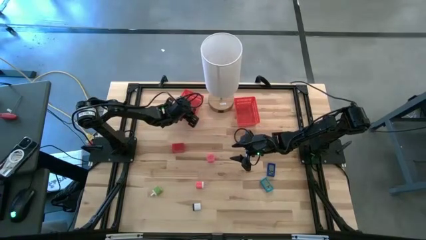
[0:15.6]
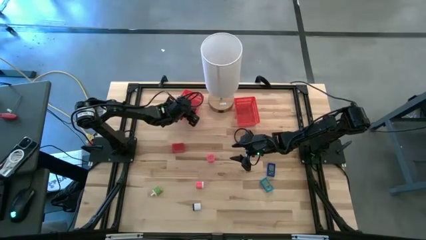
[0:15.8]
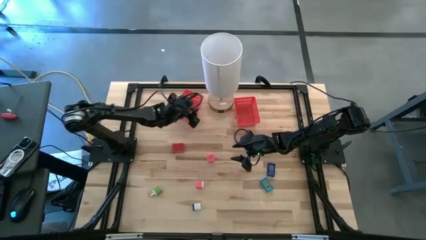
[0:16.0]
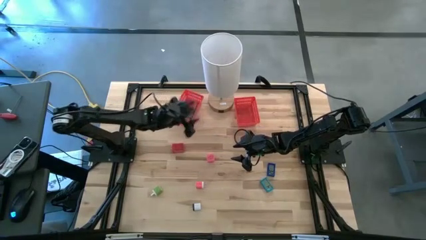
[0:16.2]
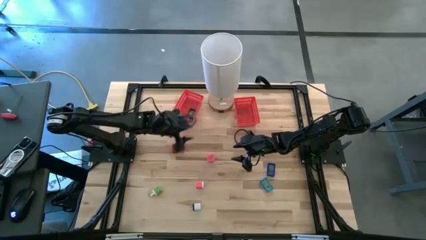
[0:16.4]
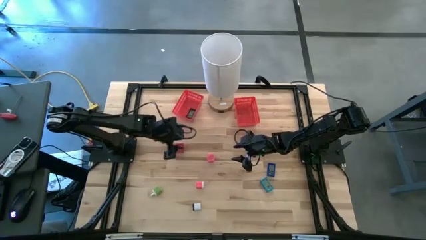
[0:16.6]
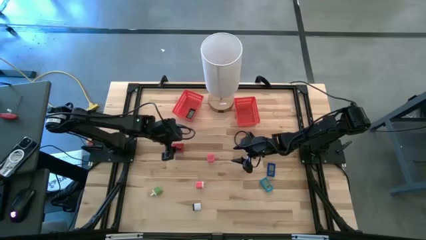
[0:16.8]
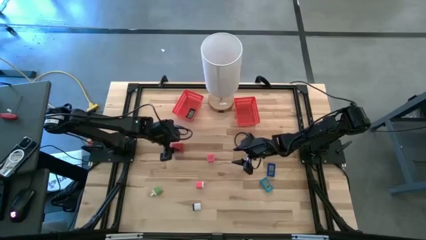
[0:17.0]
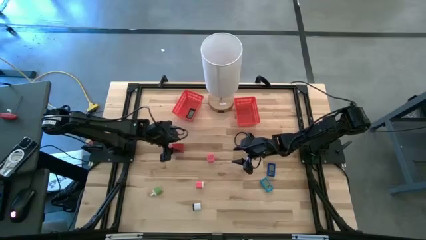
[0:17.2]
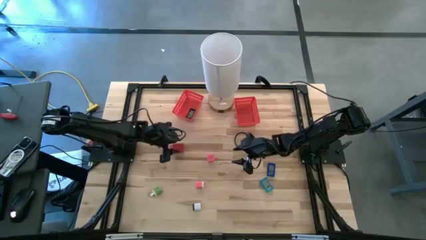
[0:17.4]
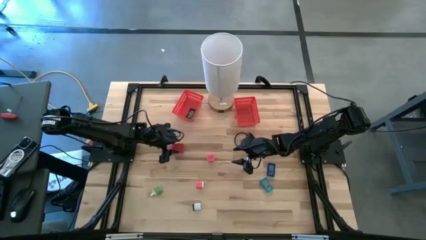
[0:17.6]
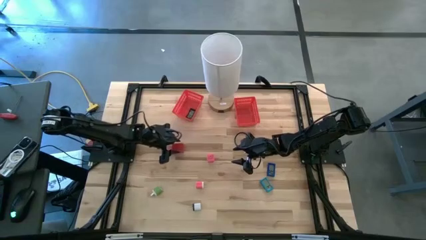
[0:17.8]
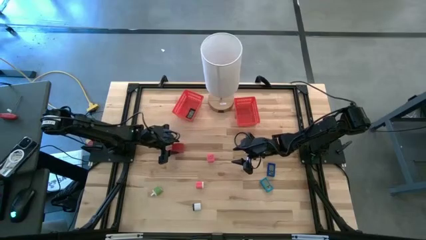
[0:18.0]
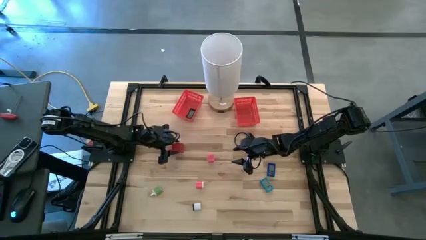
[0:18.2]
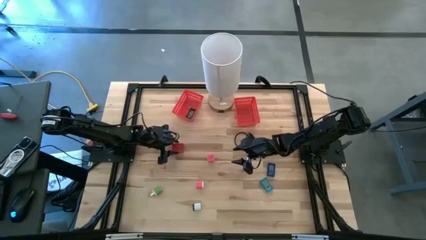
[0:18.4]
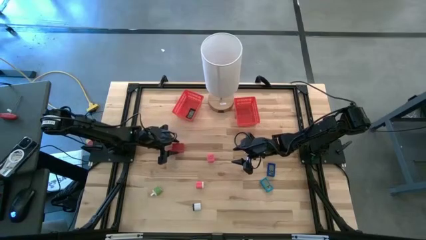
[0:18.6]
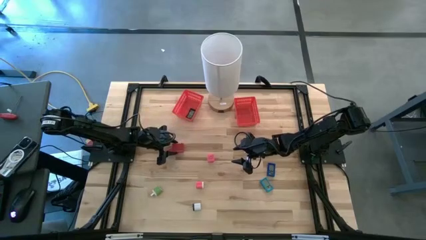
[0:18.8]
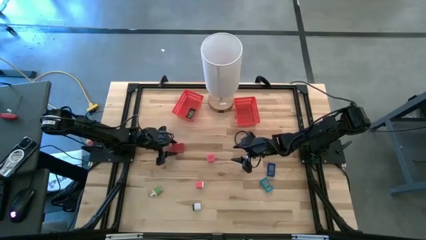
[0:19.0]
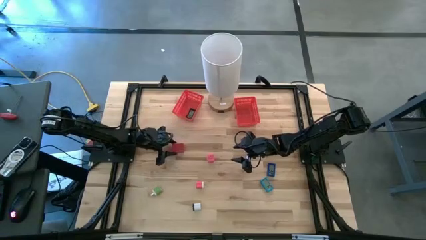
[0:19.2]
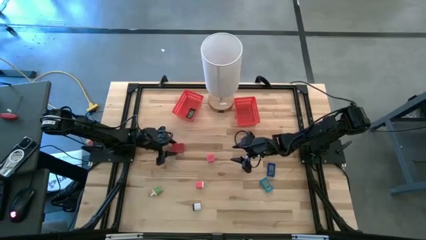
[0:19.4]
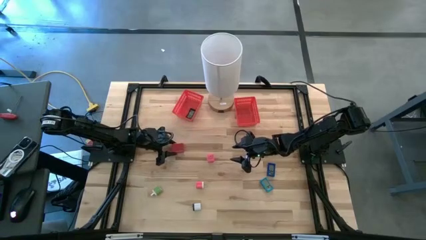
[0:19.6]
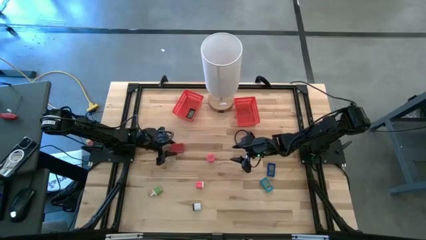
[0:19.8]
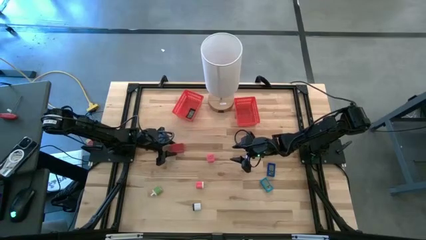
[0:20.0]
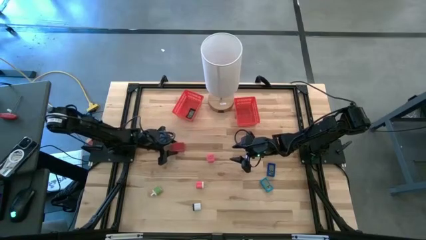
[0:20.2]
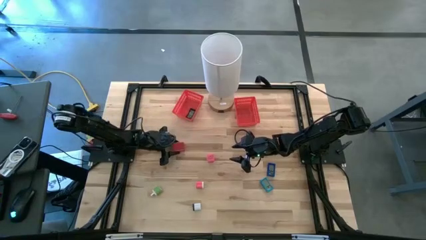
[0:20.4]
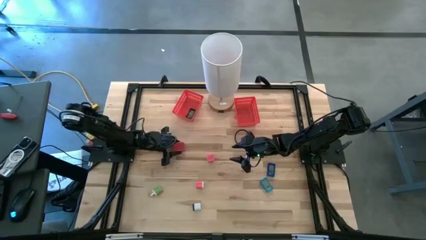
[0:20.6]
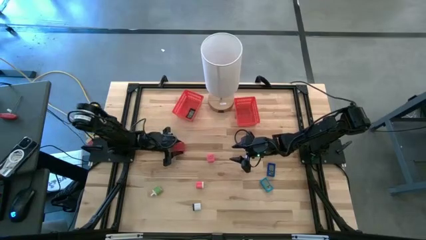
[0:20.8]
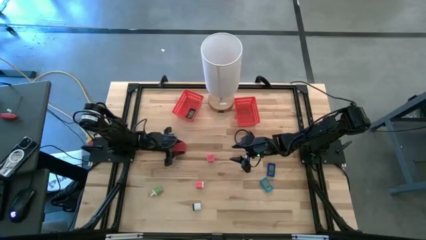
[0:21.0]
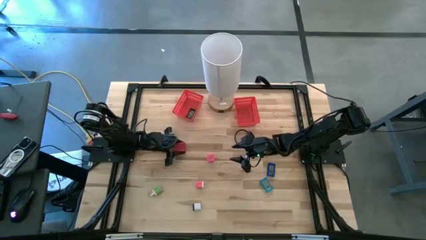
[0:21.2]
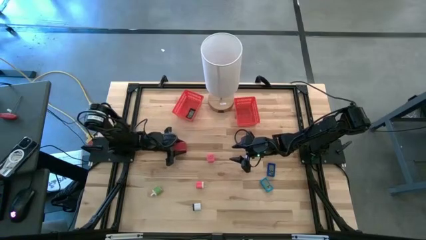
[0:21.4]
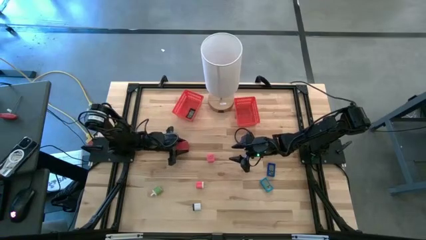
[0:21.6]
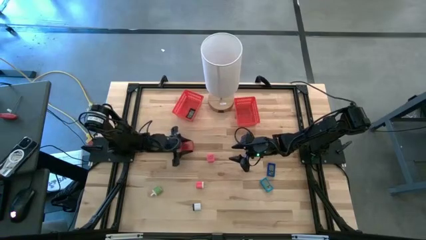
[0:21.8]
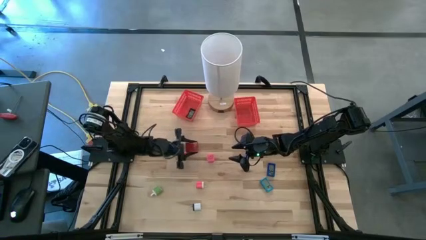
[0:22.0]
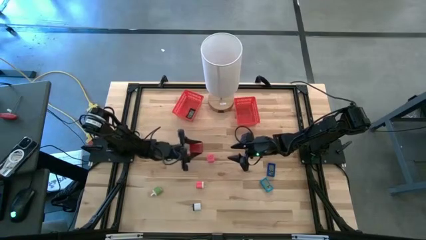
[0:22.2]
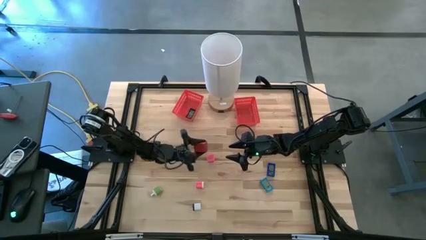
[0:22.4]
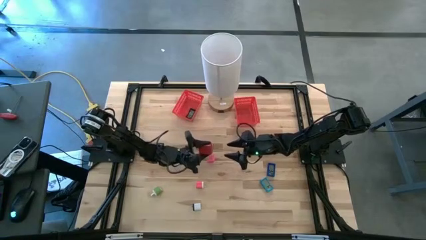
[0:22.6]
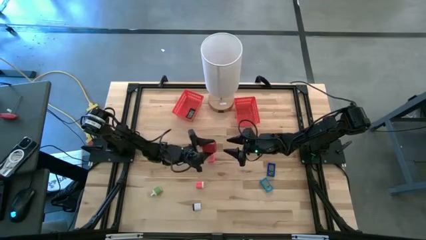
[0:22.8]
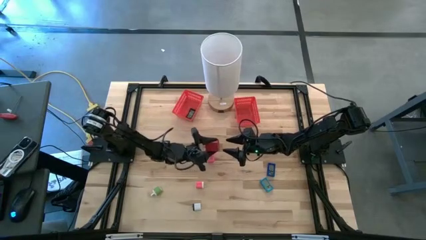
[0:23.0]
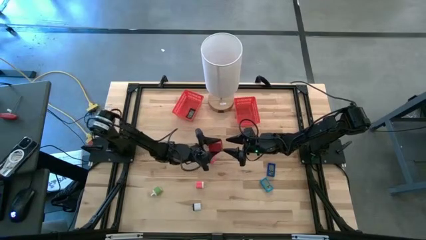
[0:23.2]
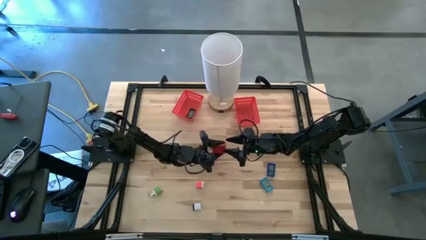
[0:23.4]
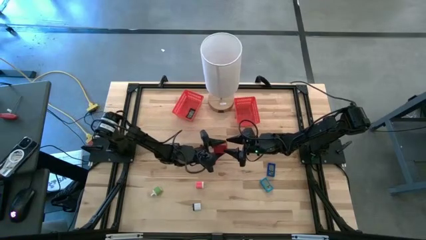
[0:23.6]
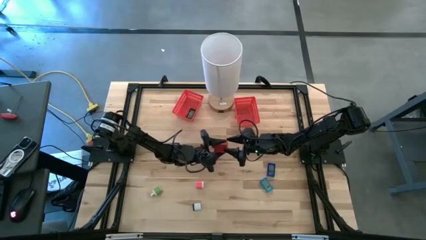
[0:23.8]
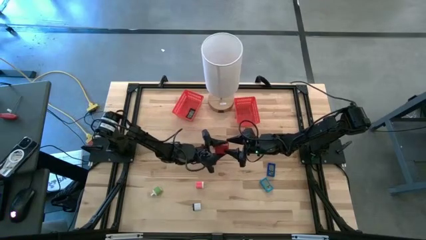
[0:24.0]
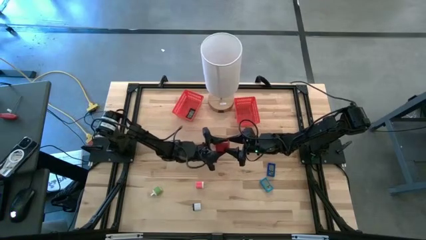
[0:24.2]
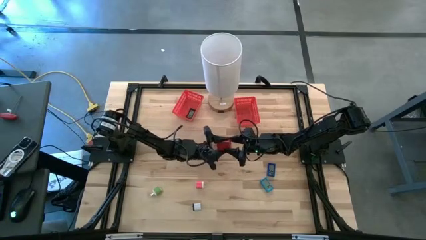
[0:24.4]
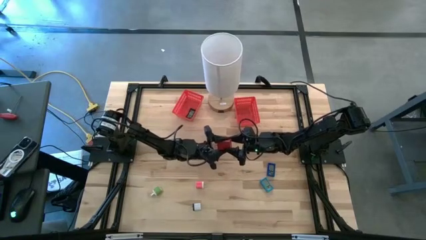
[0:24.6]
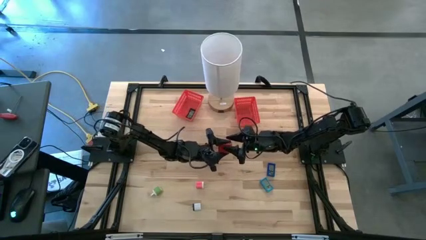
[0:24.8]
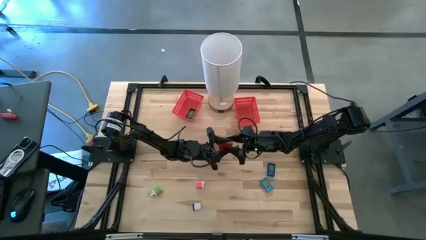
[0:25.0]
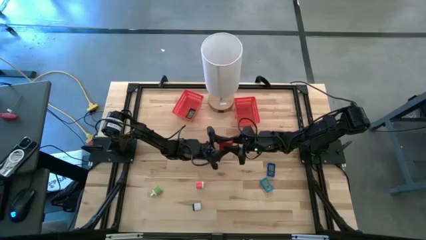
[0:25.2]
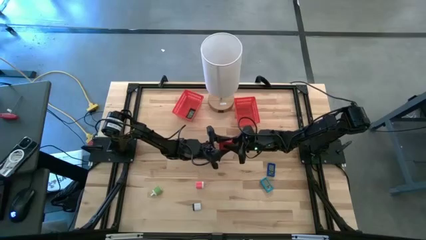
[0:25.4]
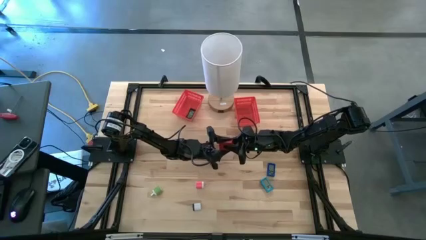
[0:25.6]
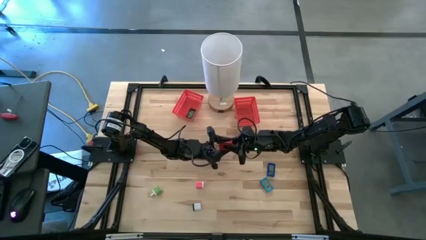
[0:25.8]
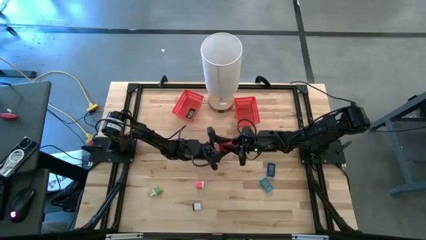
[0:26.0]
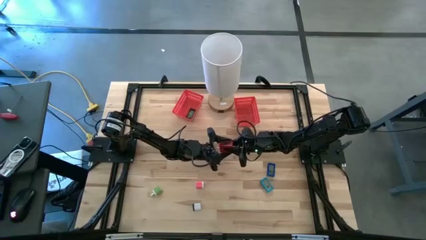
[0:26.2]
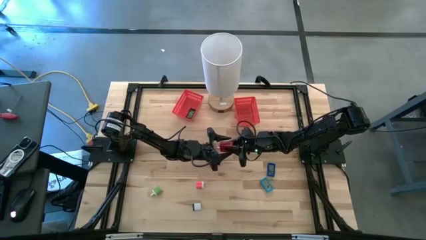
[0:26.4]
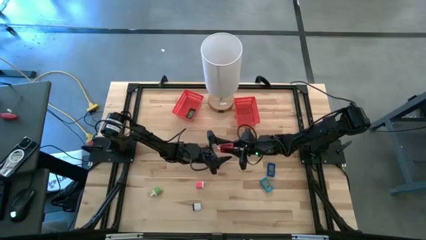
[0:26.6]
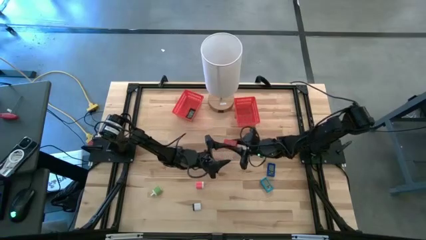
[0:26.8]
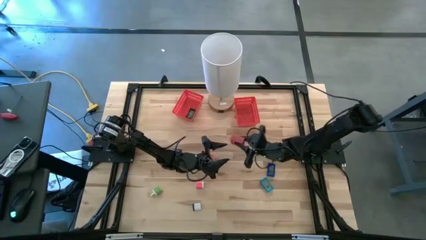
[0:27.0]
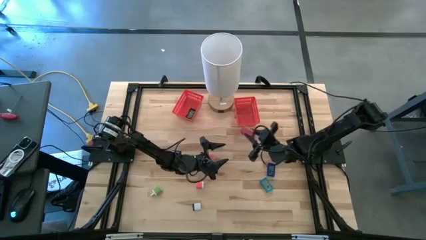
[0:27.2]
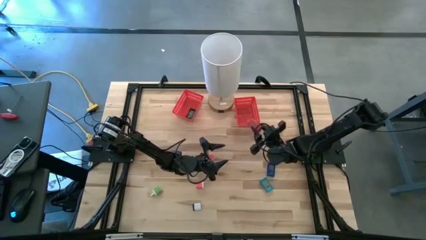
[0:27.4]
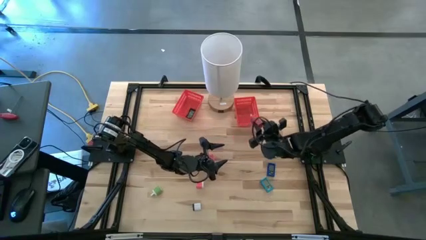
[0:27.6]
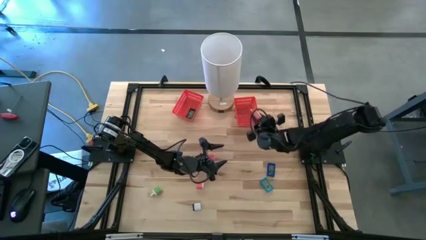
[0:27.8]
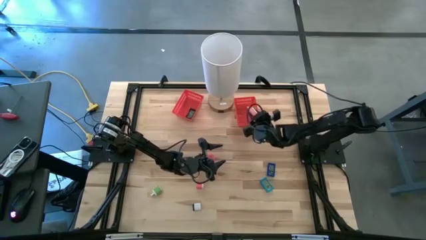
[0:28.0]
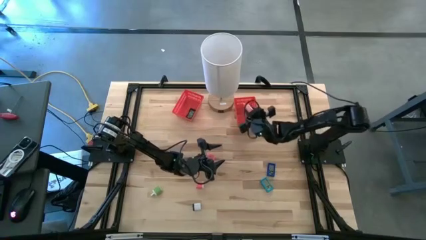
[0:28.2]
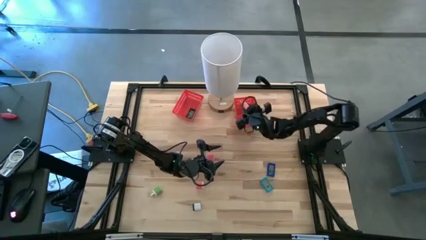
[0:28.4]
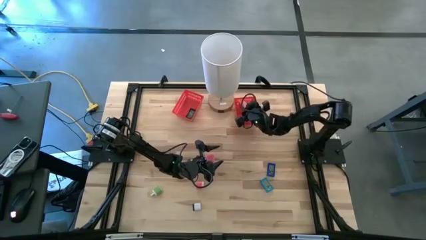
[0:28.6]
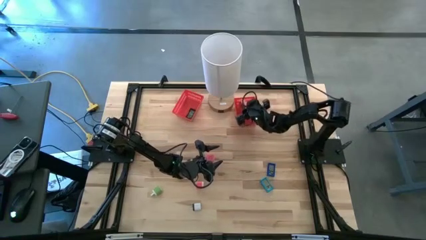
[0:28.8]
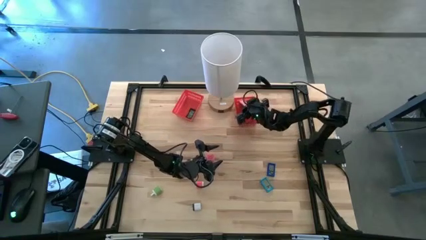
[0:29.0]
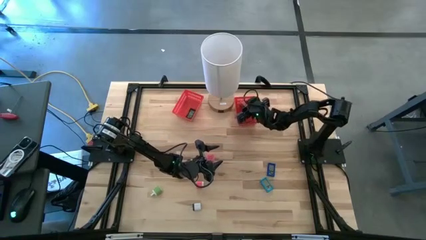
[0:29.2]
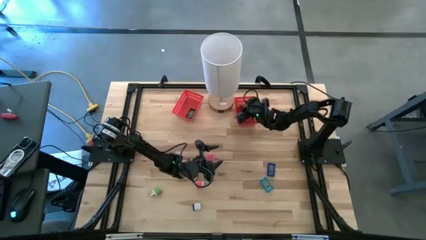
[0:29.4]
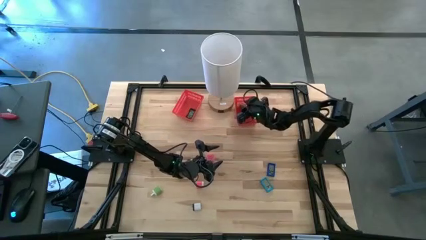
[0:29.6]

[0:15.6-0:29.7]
Task: Sort adapters and digital timers
Put the red charger adapter into the right red bin
